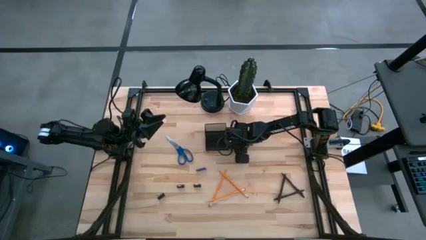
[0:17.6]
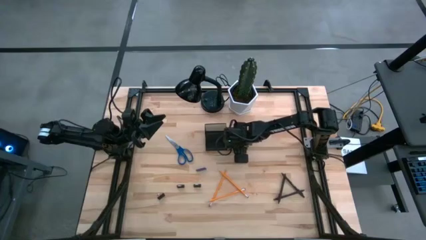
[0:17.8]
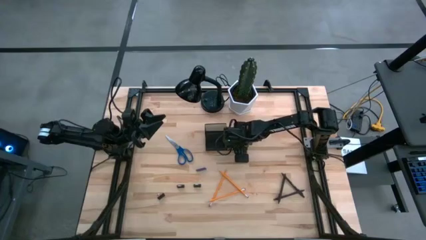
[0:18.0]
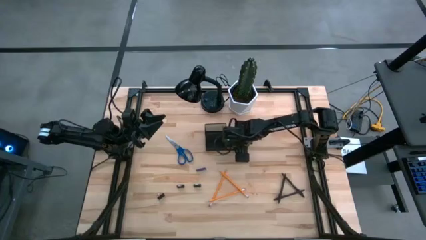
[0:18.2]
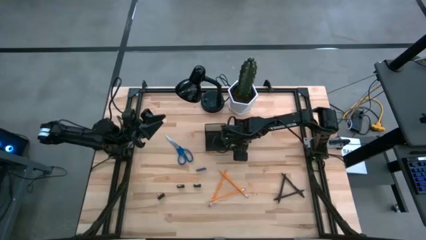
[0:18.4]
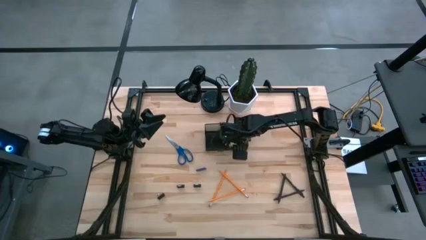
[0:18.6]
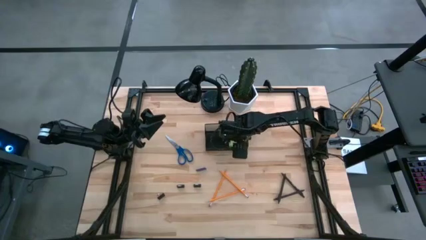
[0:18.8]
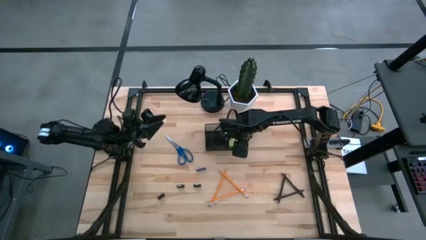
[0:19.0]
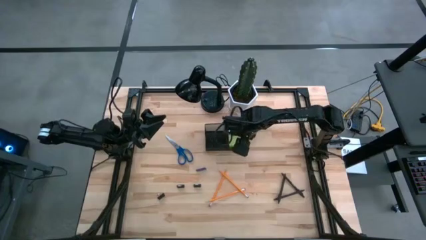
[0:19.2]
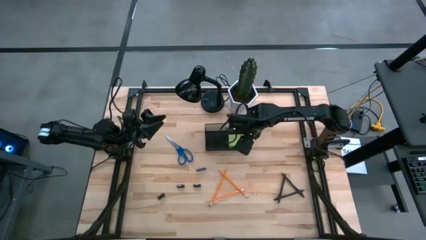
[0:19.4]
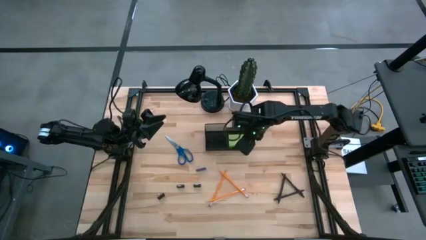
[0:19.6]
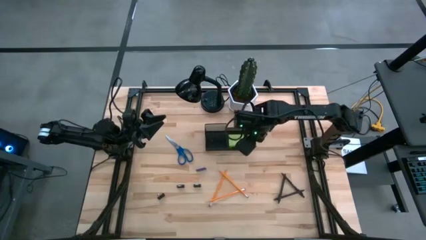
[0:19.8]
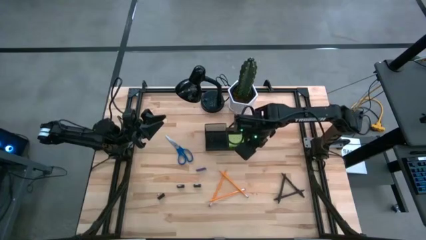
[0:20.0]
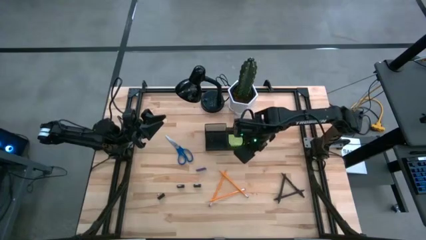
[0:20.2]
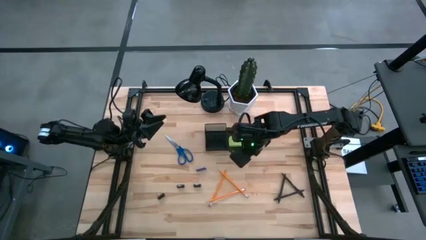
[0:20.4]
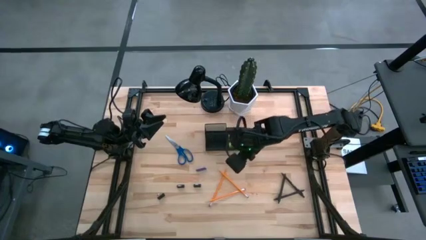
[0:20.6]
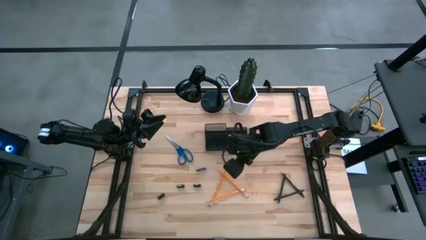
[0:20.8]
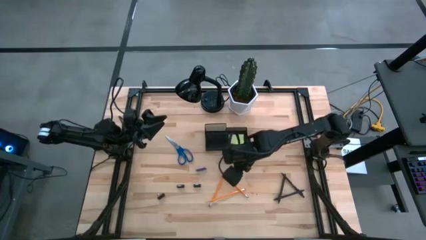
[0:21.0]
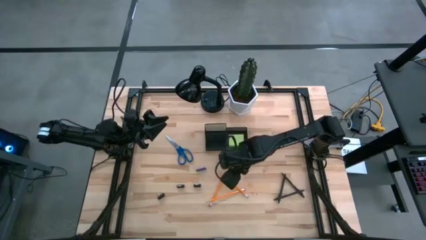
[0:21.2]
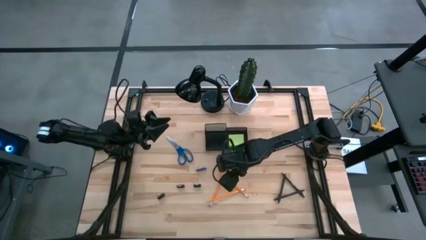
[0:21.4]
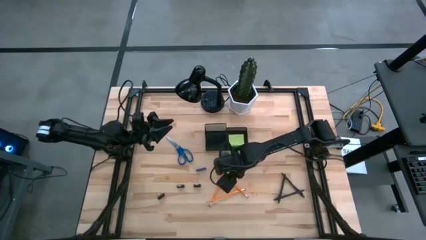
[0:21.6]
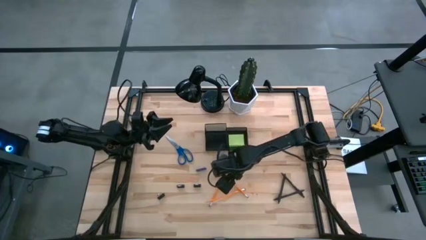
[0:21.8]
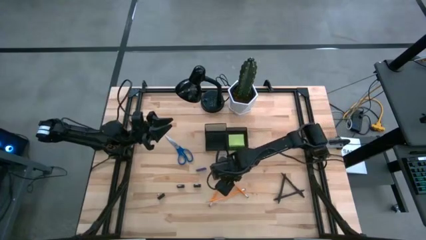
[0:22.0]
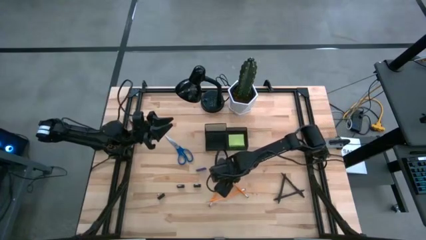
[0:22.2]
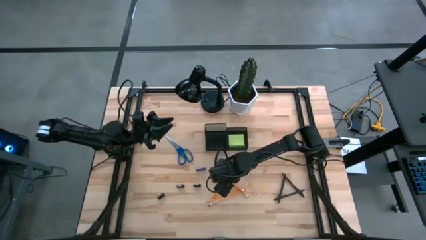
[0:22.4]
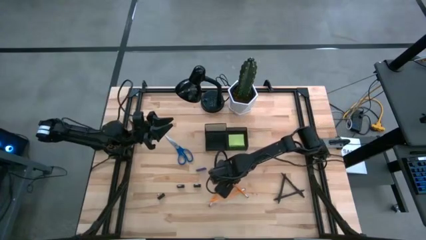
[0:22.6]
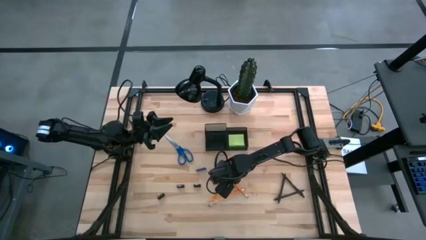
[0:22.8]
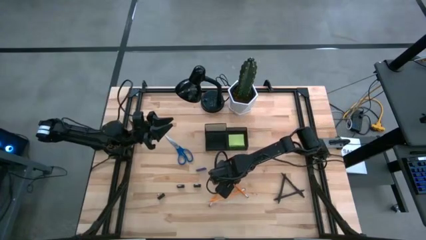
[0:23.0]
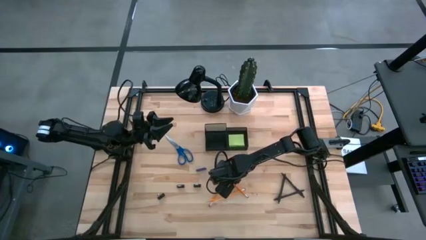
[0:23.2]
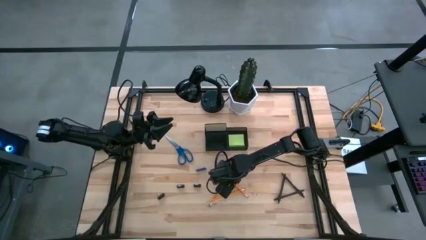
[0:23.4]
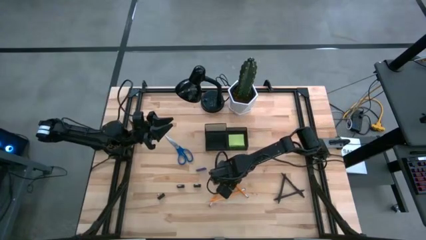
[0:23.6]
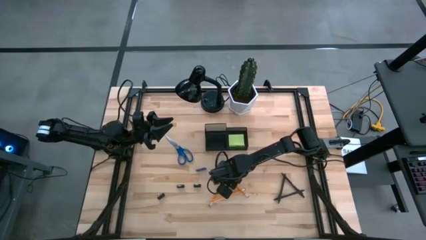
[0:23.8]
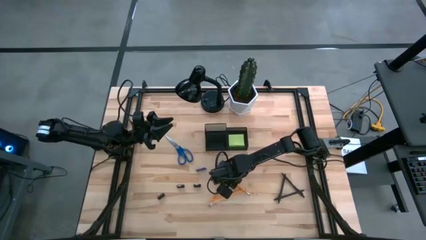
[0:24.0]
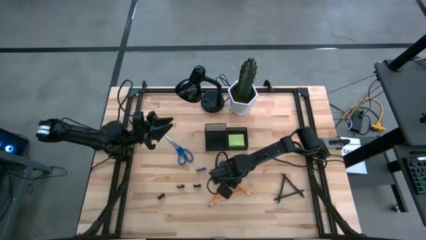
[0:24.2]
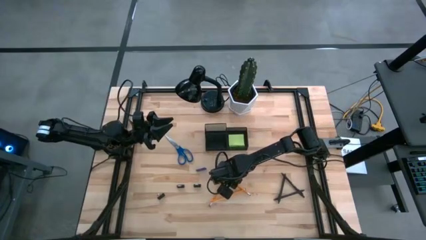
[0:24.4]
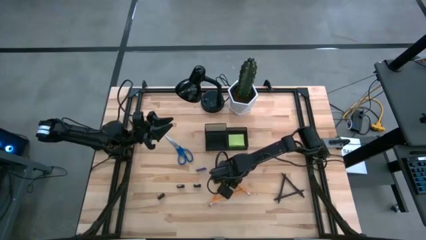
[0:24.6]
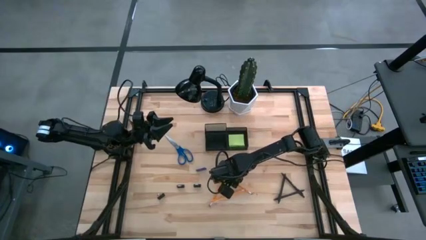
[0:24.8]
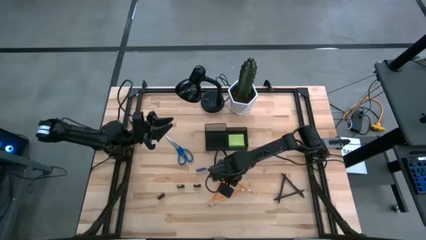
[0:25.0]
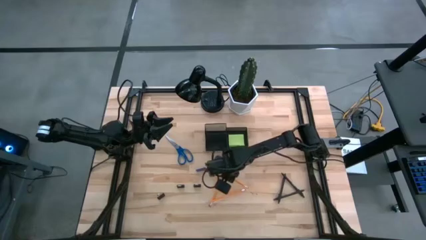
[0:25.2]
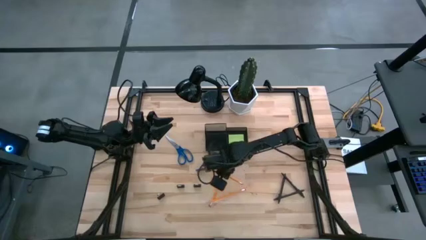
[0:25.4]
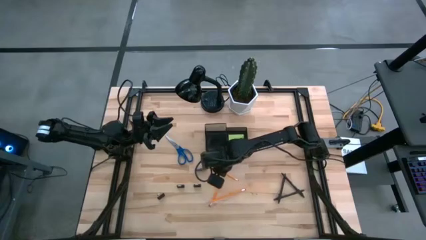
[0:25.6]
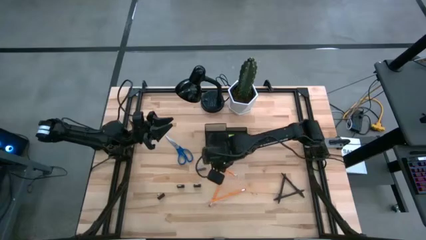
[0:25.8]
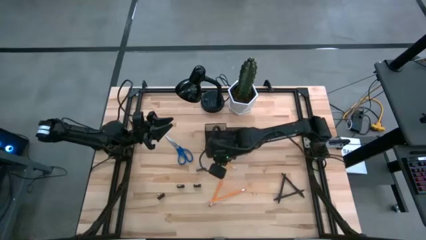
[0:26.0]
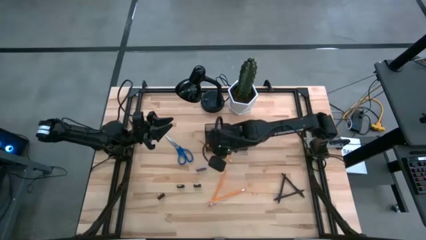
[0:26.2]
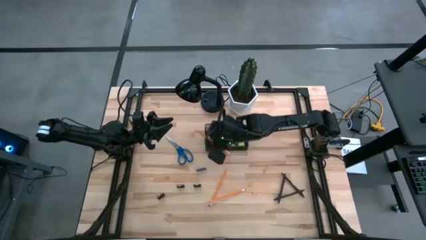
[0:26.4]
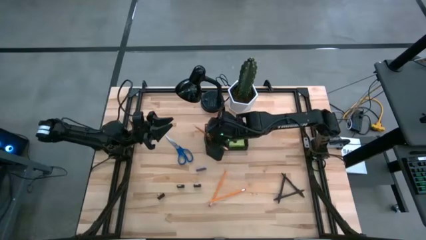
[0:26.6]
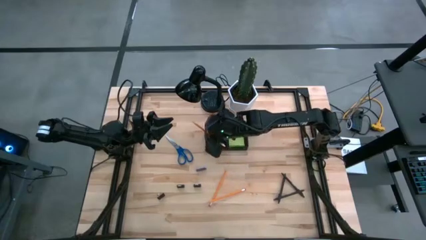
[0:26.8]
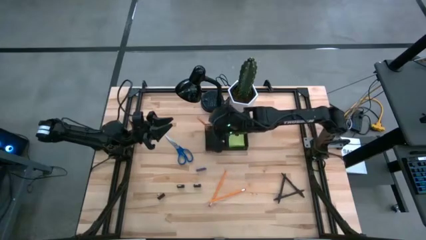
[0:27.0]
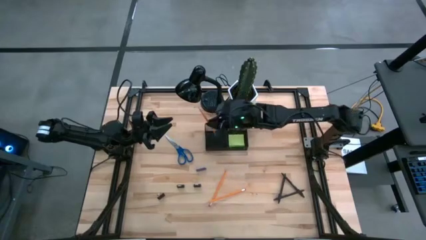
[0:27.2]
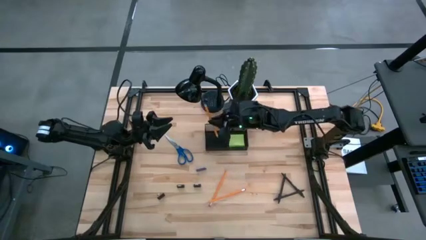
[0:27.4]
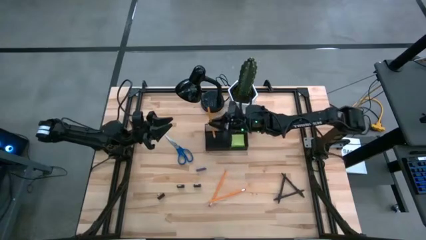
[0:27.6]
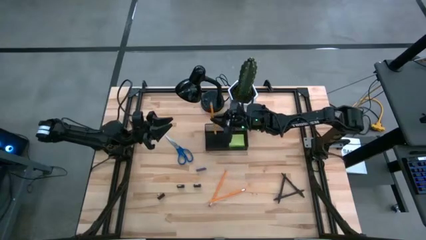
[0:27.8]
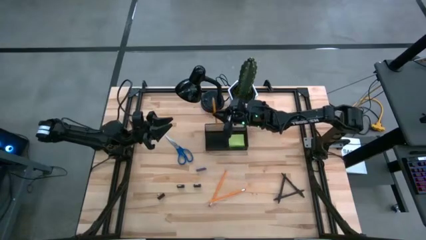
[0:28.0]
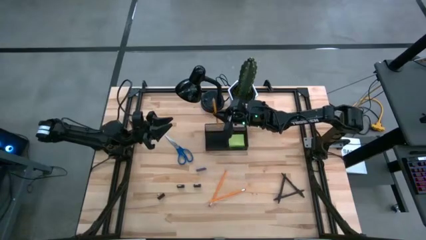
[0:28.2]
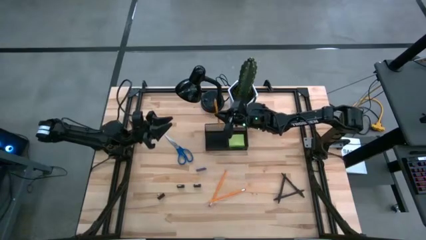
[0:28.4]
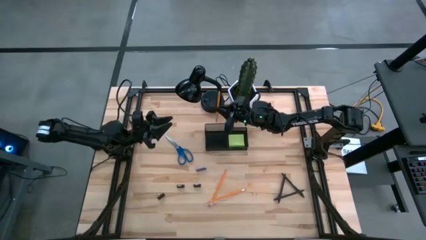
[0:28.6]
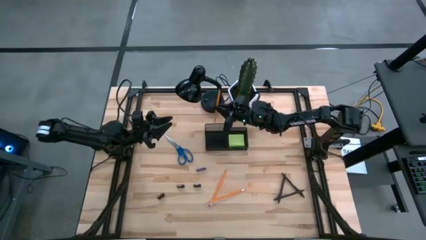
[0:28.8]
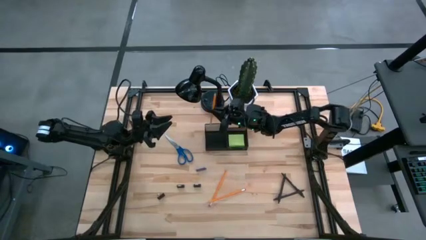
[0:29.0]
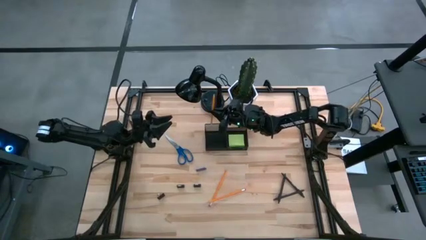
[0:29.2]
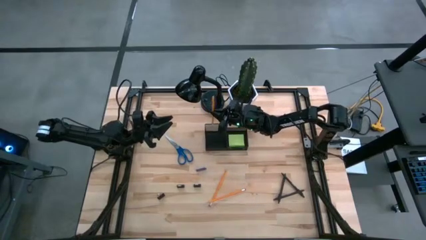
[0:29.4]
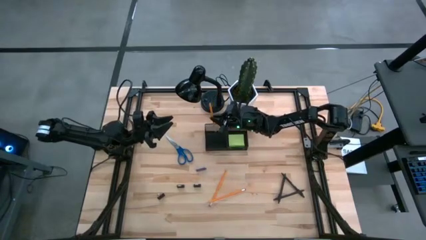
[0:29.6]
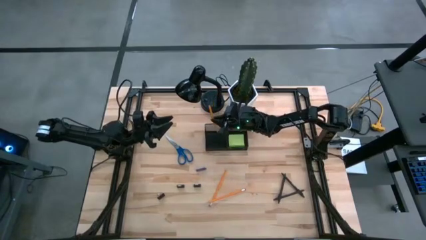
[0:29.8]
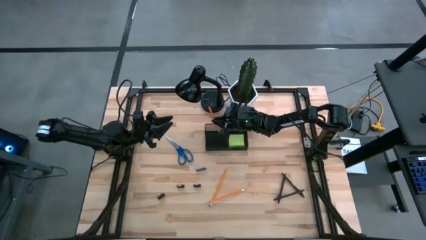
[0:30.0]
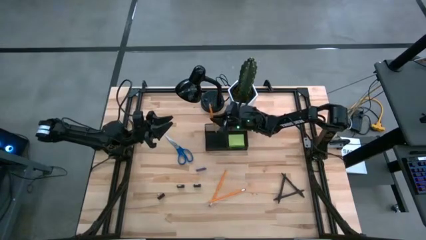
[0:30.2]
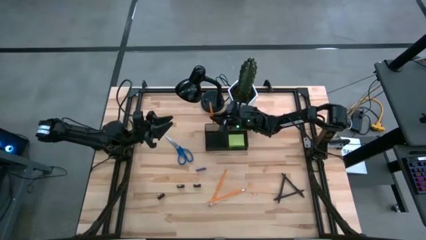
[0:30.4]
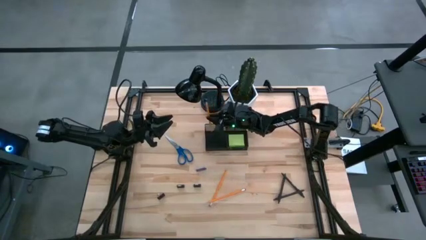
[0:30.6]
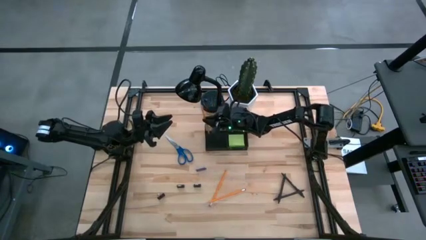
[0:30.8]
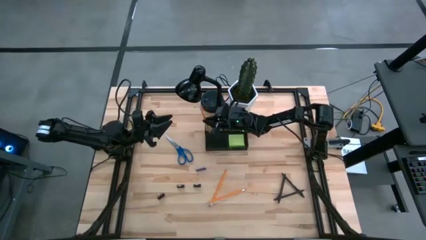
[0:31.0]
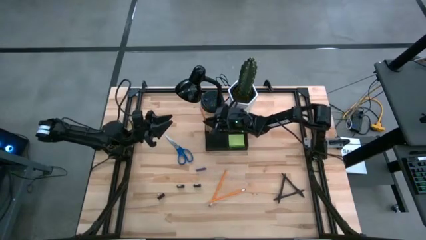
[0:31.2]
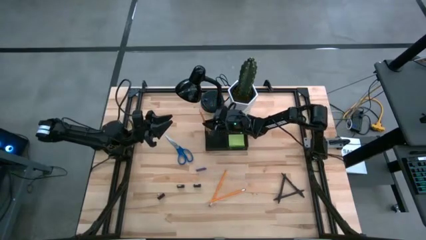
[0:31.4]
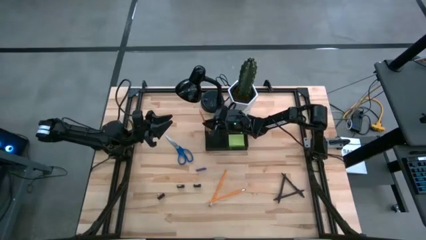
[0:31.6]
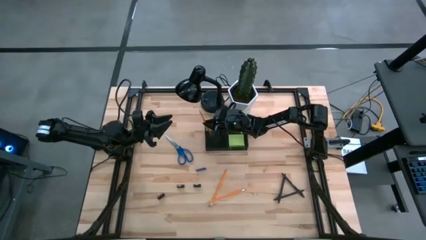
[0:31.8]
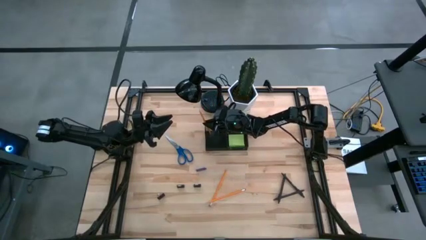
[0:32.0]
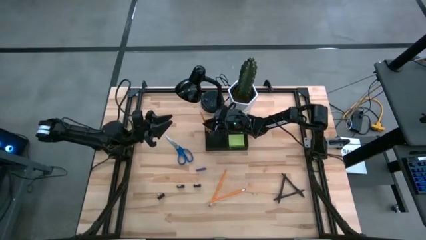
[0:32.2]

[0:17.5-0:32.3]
Task: Pick and place office supplies into organizer
Put the yellow pencil into the desk organizer
